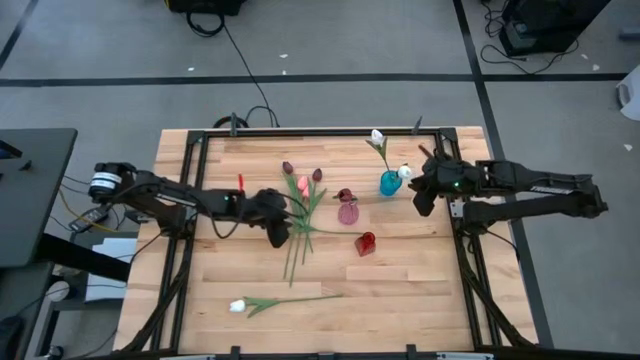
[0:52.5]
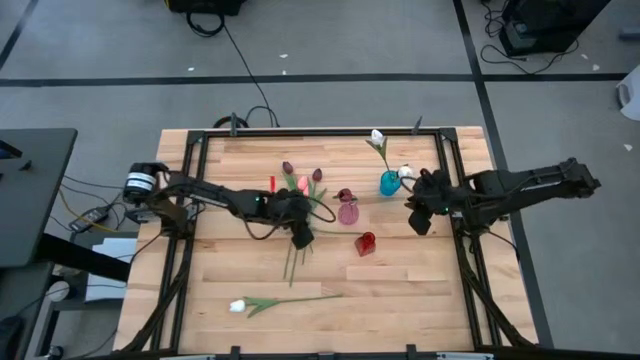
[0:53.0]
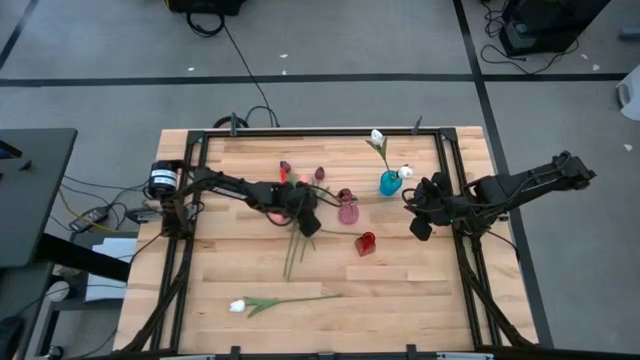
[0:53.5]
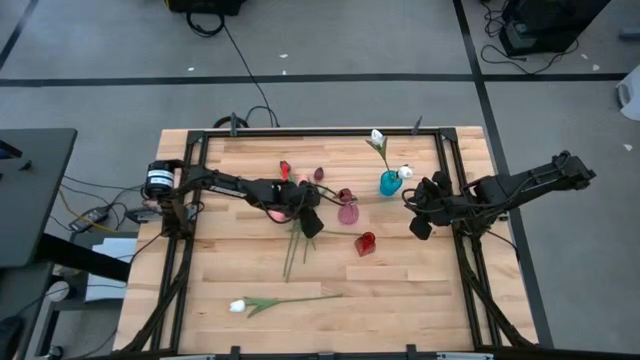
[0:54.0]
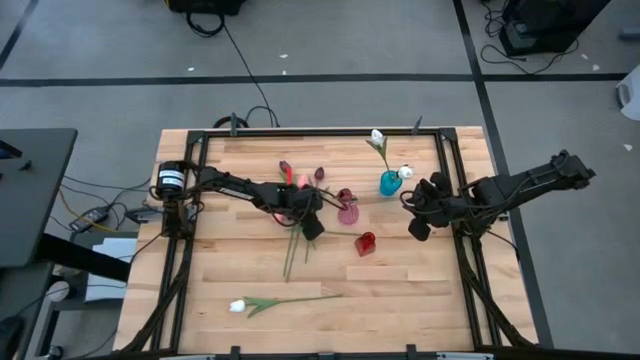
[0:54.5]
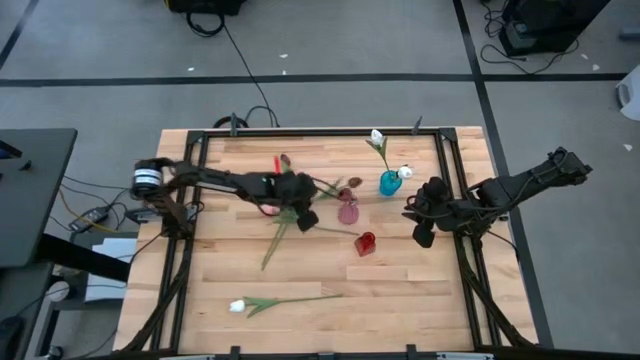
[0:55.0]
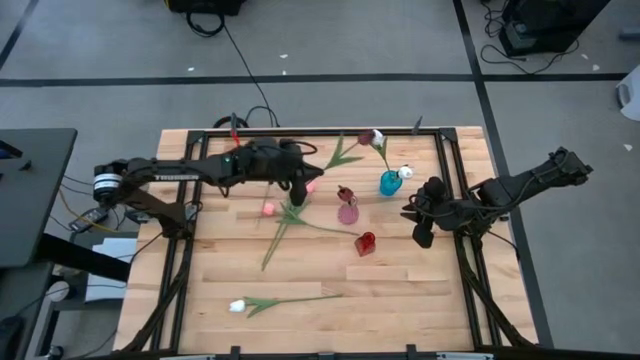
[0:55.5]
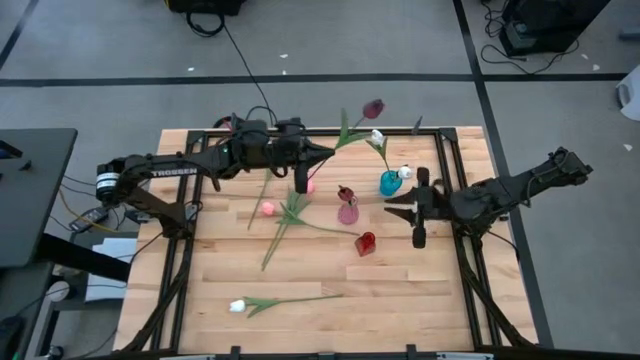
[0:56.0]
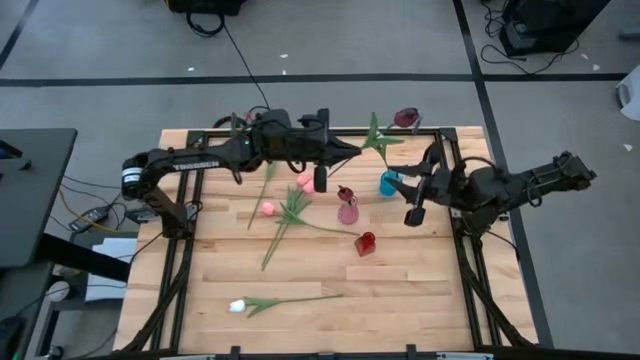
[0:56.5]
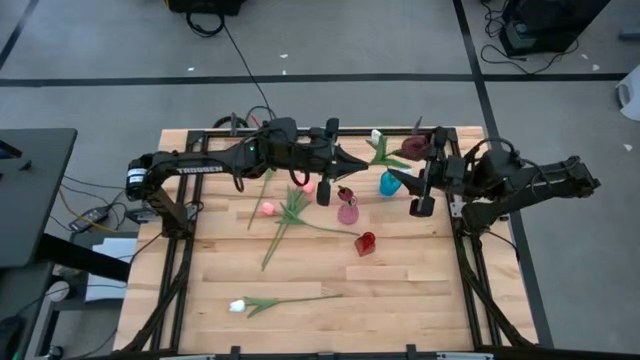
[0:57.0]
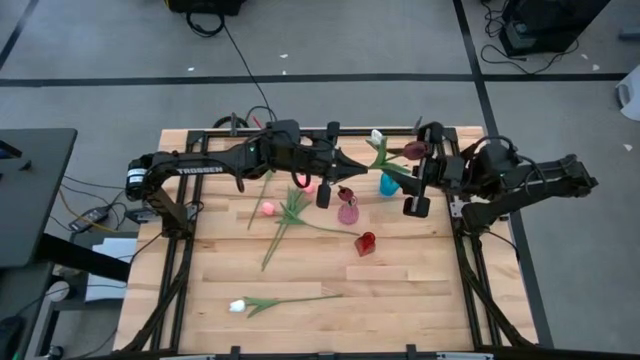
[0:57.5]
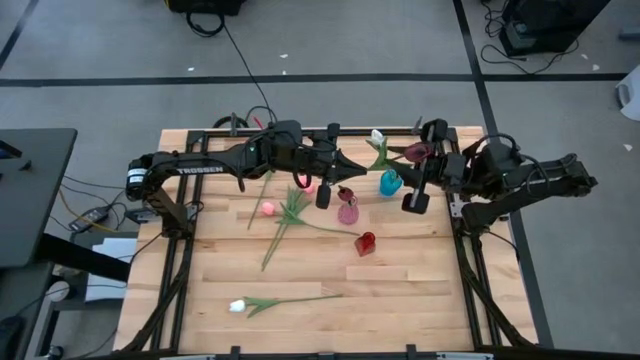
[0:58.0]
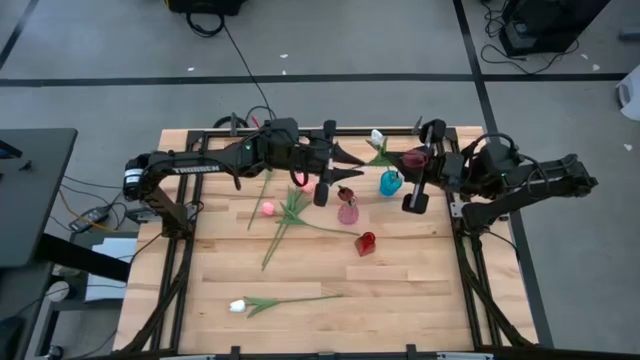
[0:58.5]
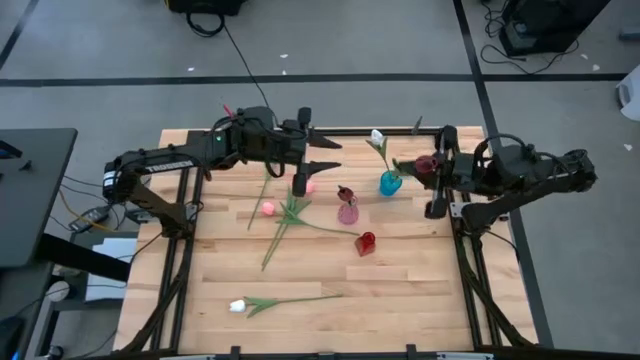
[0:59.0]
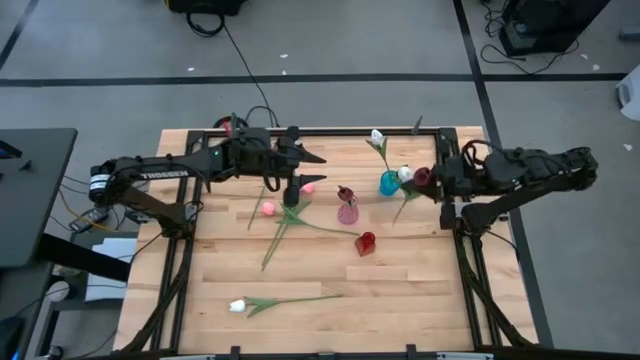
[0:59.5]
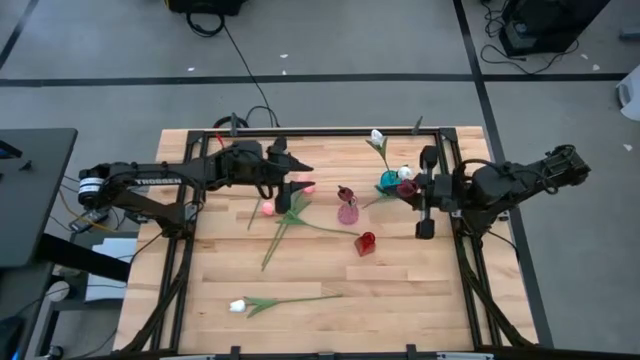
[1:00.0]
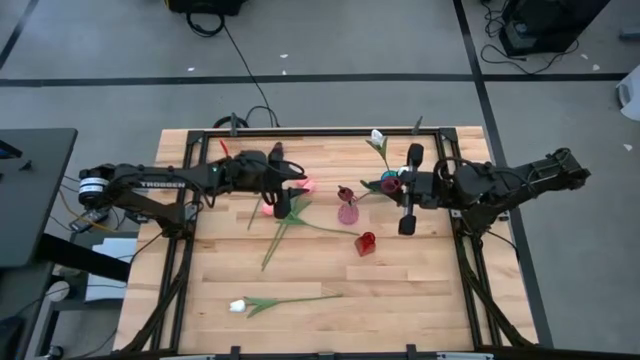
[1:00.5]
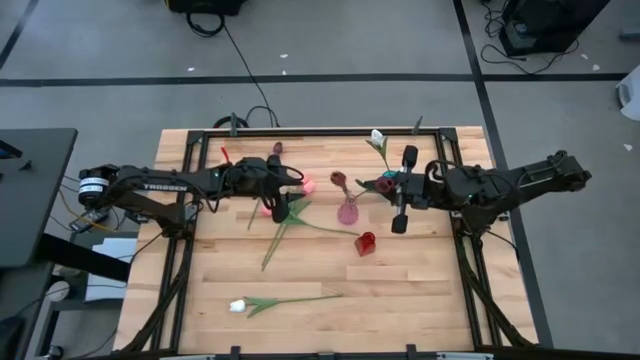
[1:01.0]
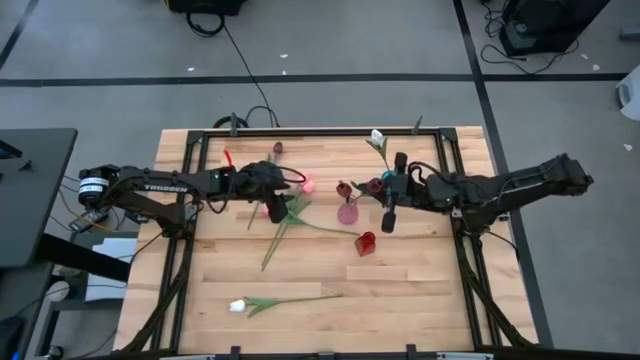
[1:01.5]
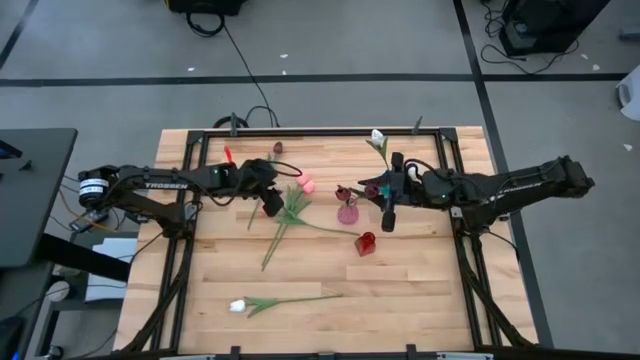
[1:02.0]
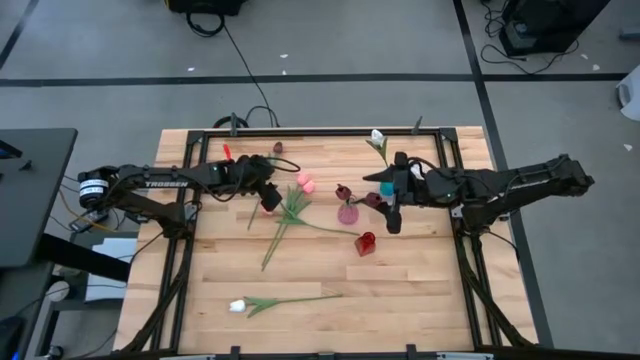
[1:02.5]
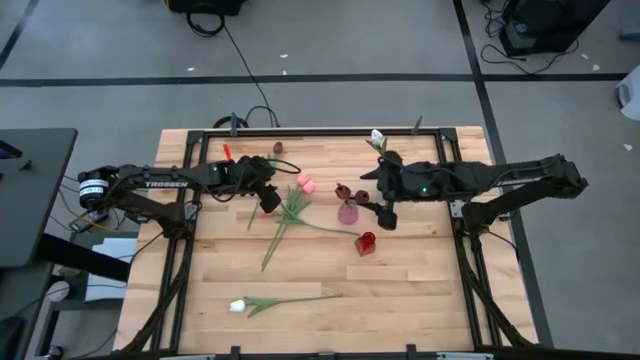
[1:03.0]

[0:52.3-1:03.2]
Task: Sort flowers into vase by color
Put the red flower into the purple vase

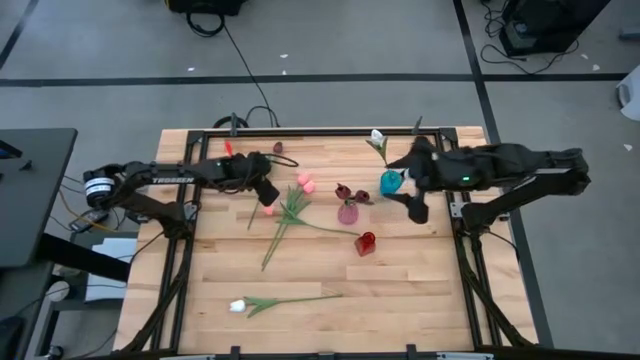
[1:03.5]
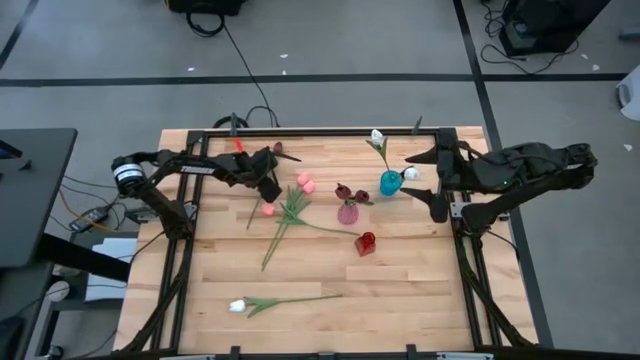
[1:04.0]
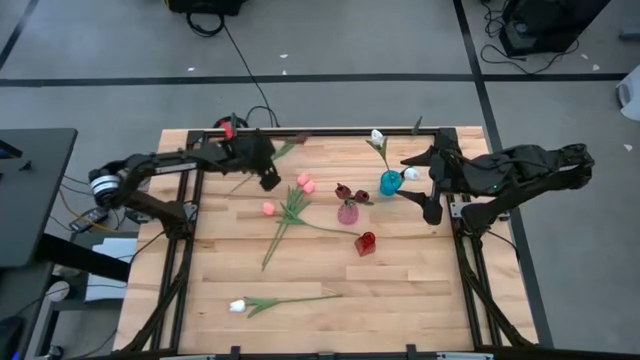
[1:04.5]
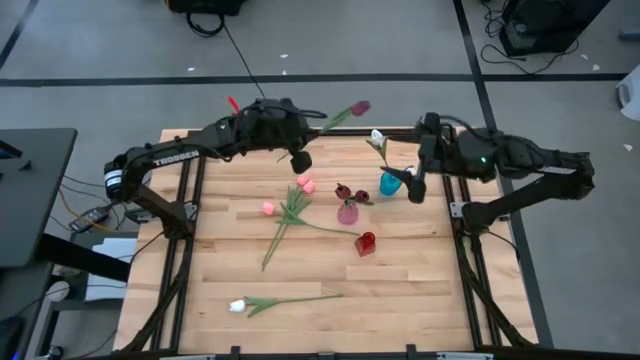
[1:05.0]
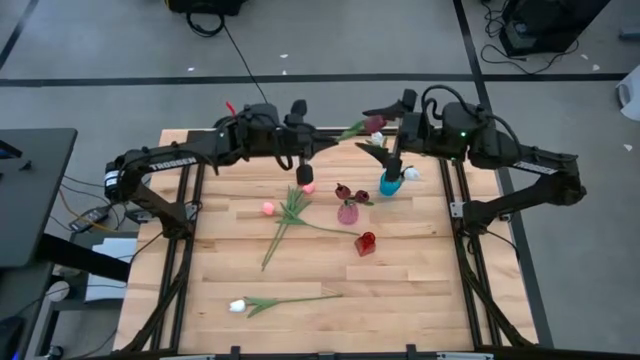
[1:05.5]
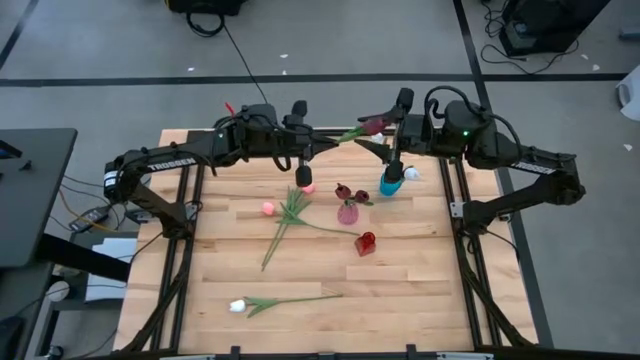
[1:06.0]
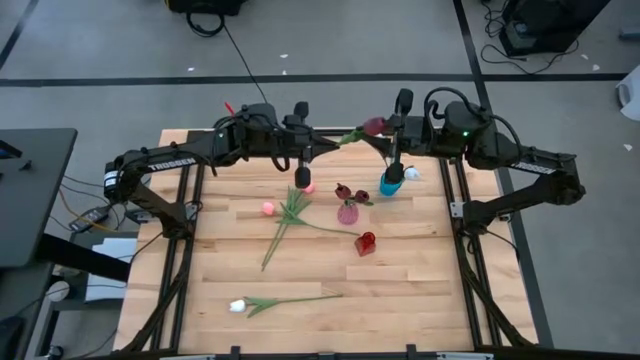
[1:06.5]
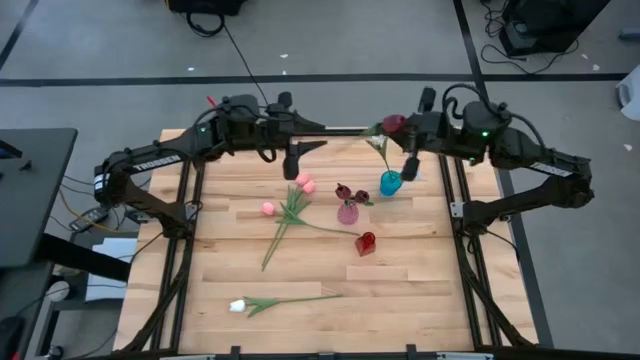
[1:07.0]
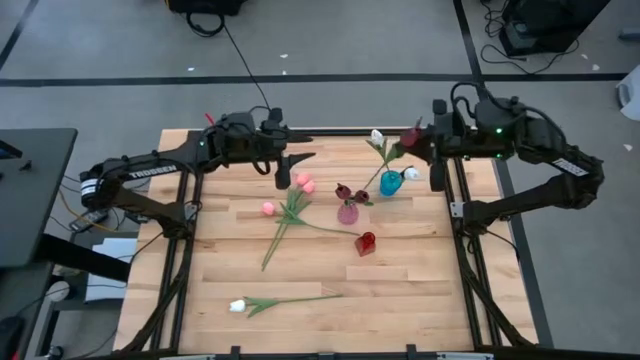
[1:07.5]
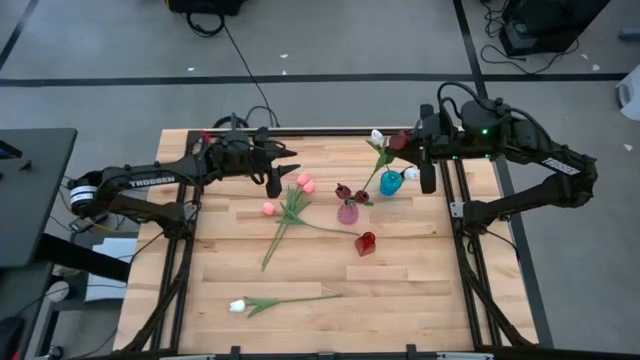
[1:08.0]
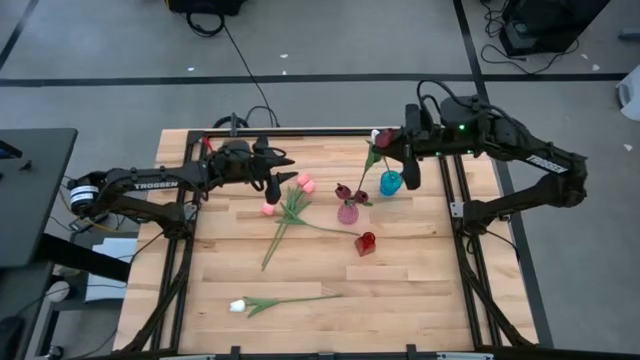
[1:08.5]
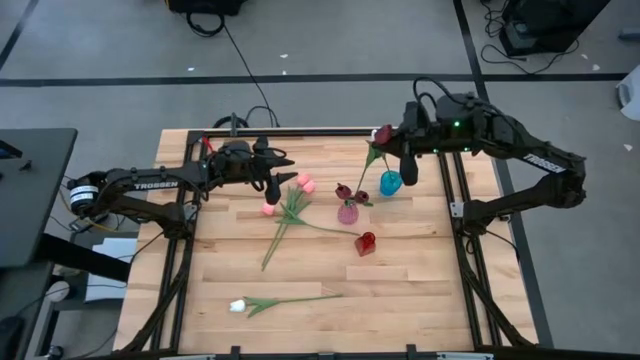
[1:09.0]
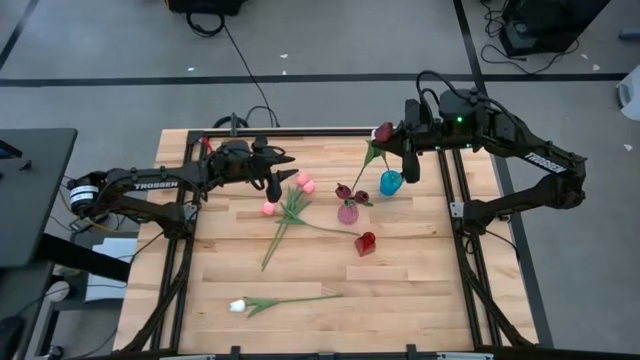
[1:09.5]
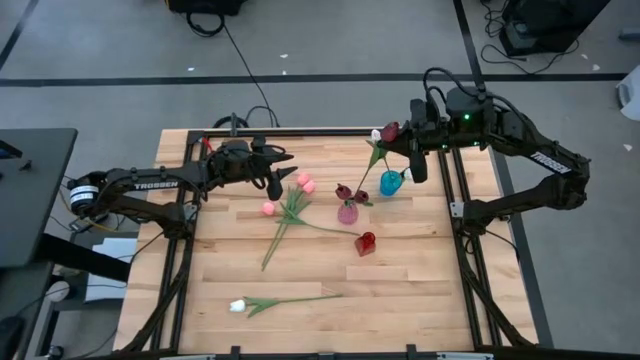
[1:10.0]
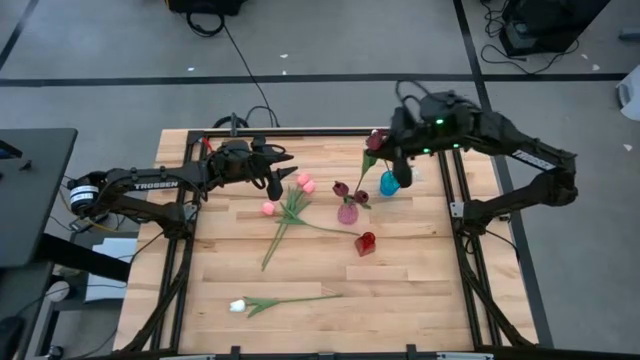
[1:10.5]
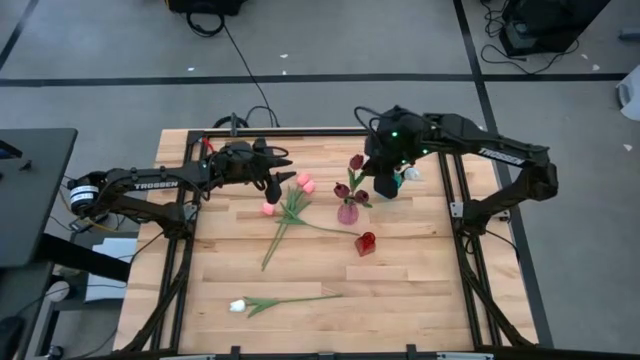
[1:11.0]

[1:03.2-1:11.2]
Put the red flower into the purple vase

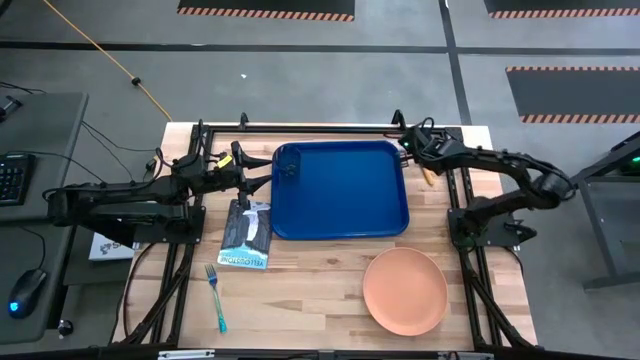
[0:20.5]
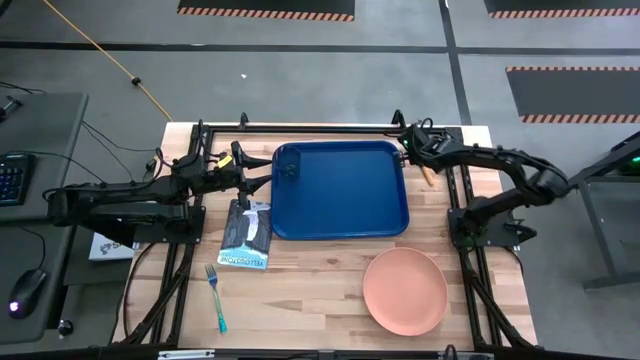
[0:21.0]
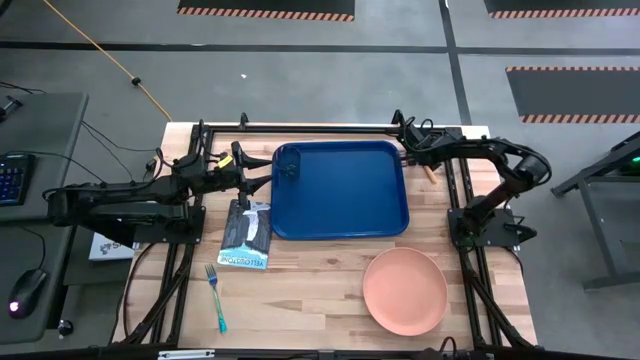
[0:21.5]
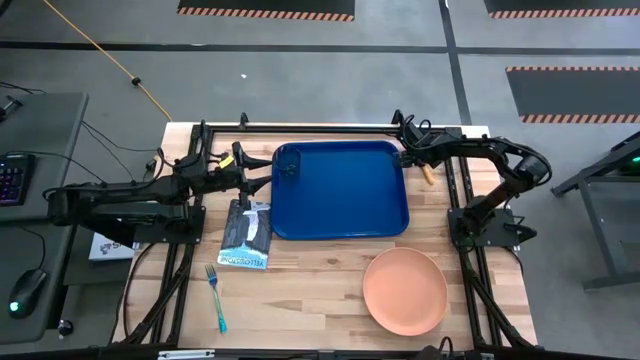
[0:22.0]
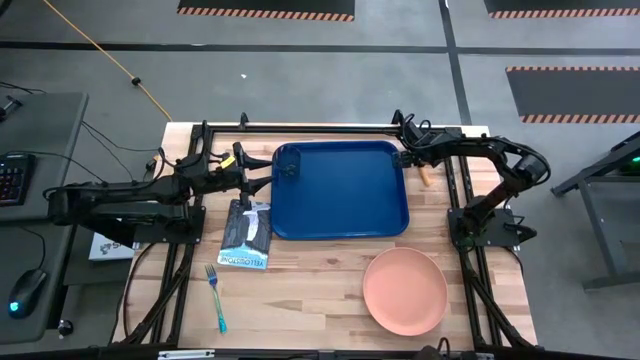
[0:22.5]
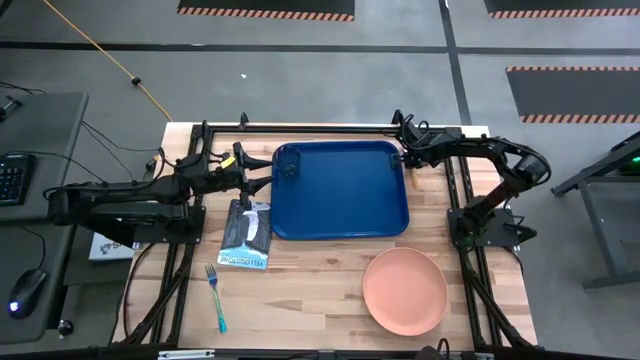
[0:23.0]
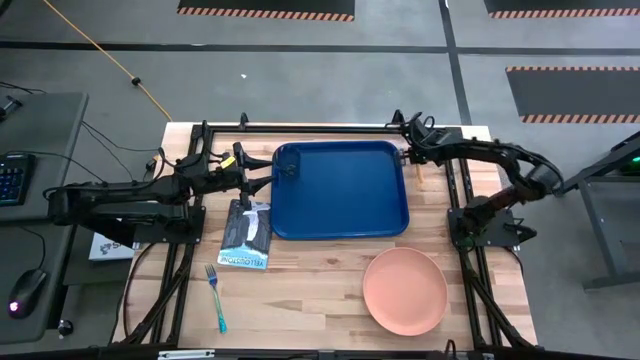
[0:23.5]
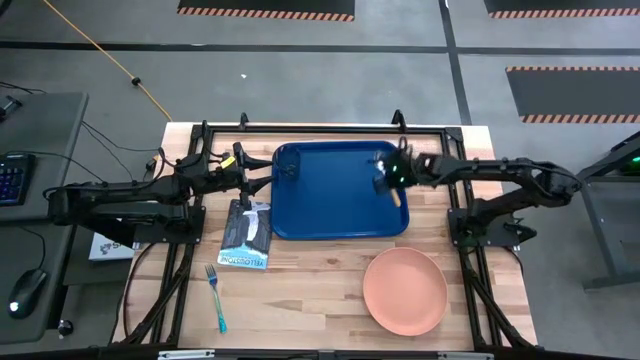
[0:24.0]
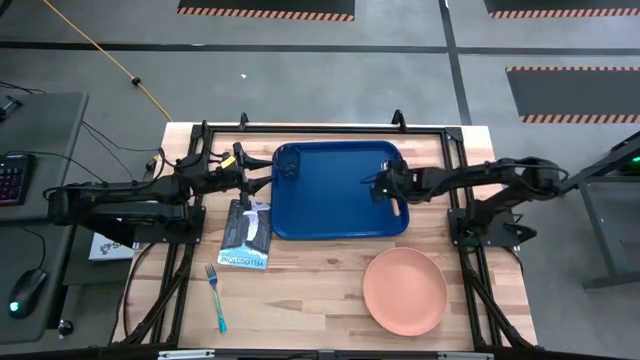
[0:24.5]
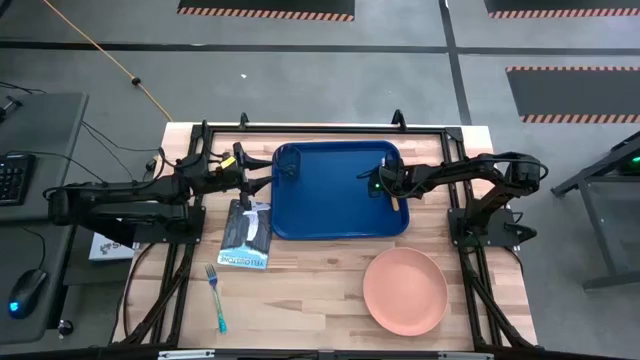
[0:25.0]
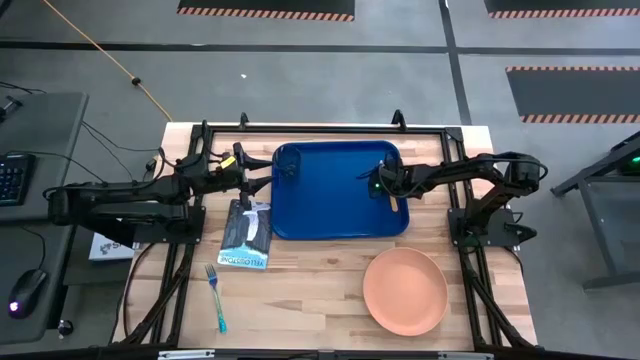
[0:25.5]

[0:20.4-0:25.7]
Task: Pick and place plate/cup/fork/spoon on tray
Put the yellow spoon on the right side of the blue tray
